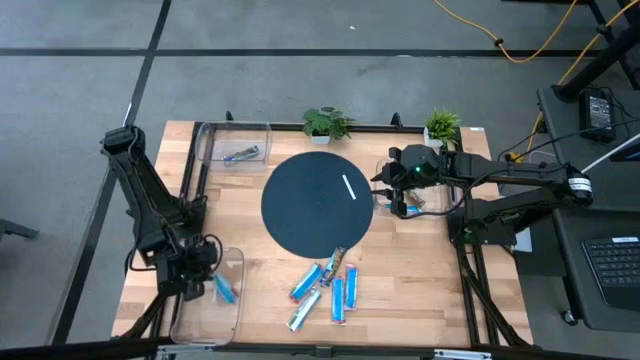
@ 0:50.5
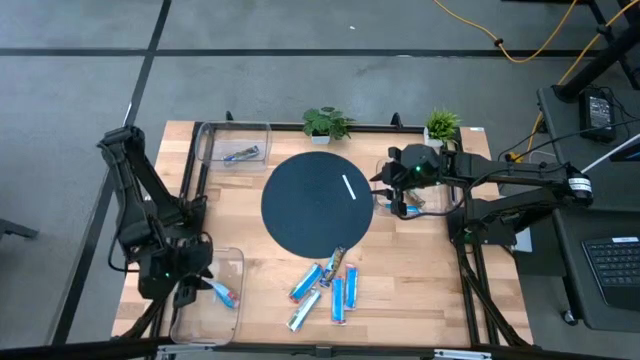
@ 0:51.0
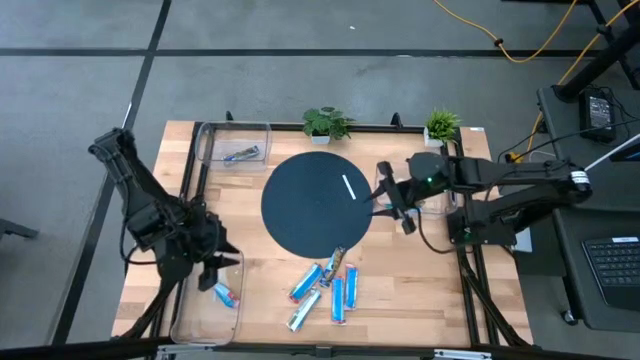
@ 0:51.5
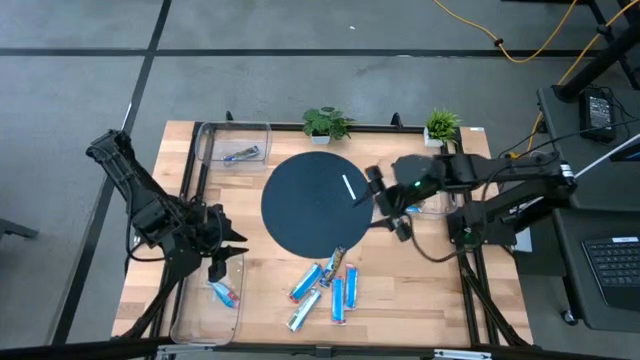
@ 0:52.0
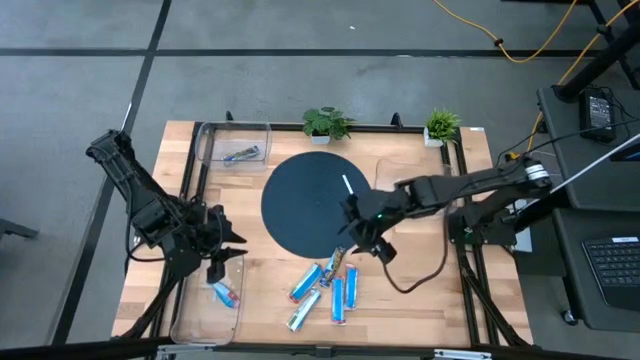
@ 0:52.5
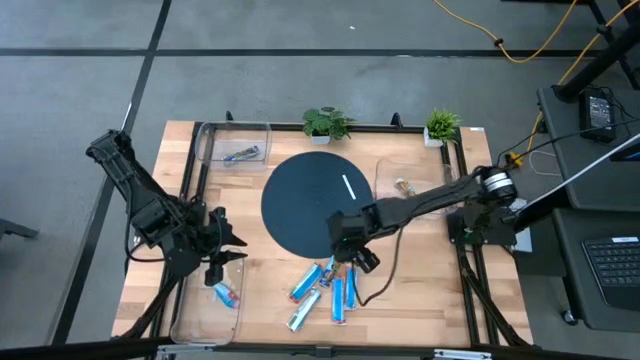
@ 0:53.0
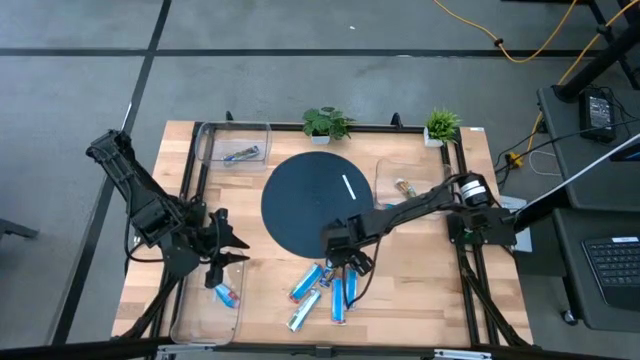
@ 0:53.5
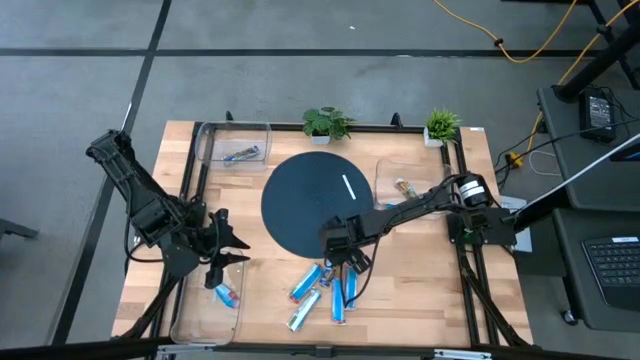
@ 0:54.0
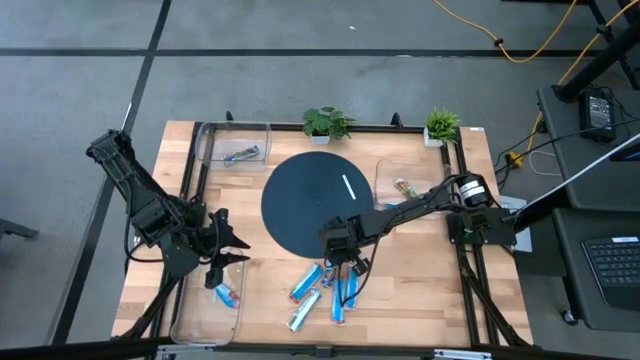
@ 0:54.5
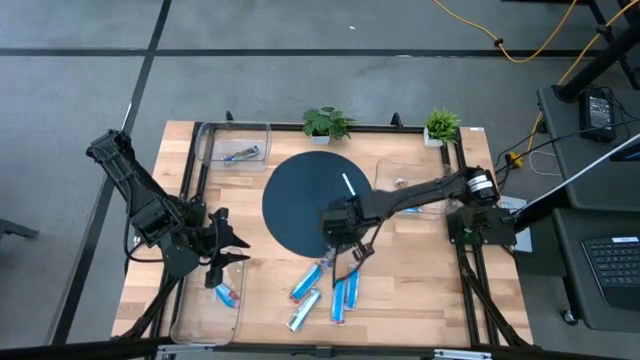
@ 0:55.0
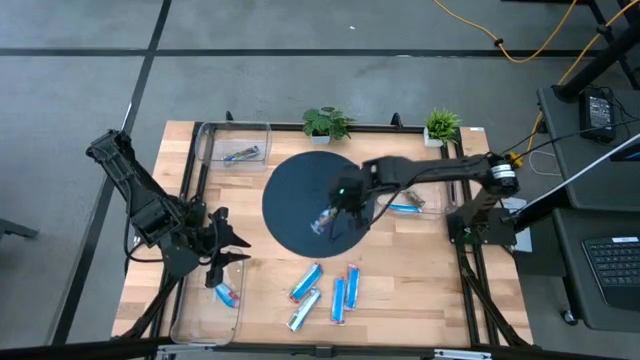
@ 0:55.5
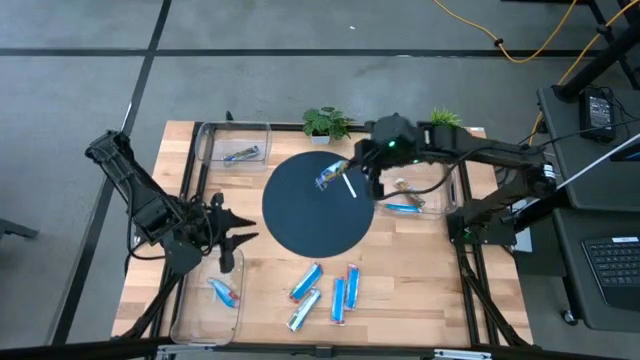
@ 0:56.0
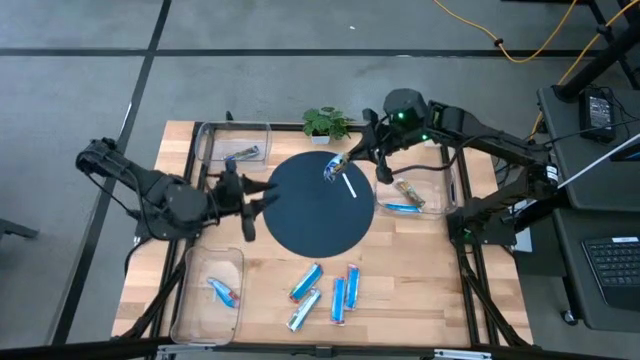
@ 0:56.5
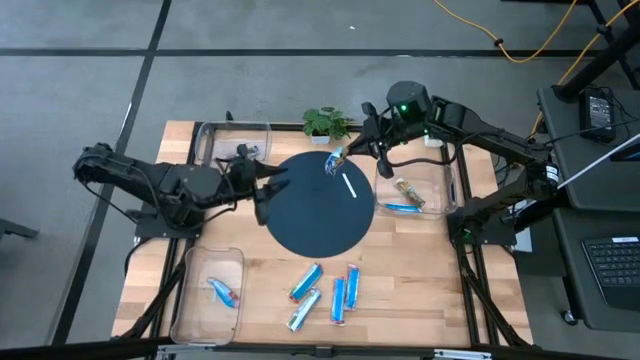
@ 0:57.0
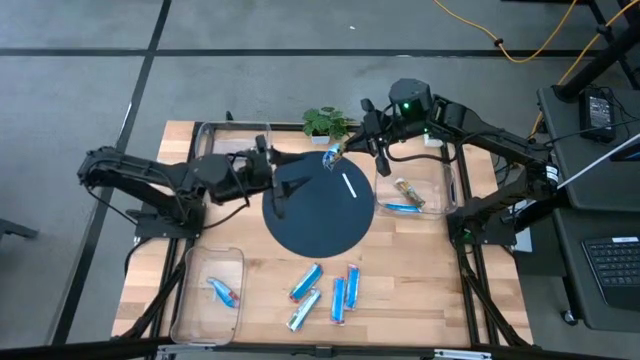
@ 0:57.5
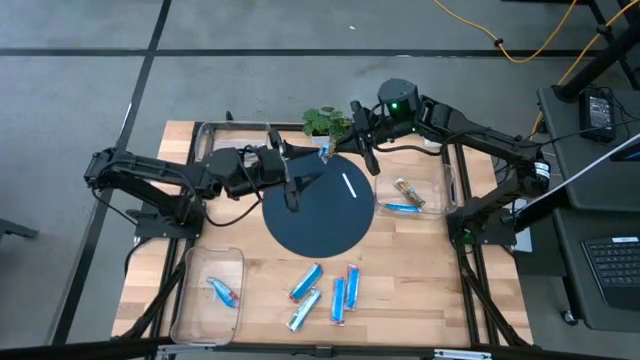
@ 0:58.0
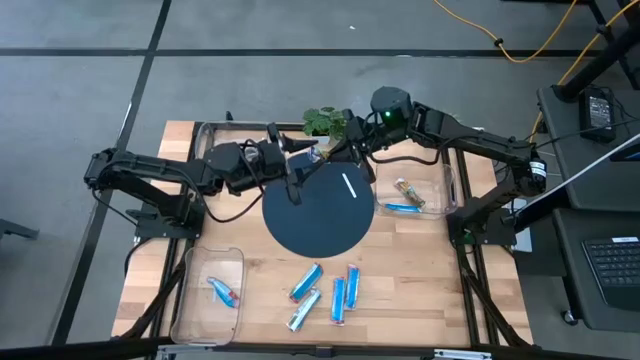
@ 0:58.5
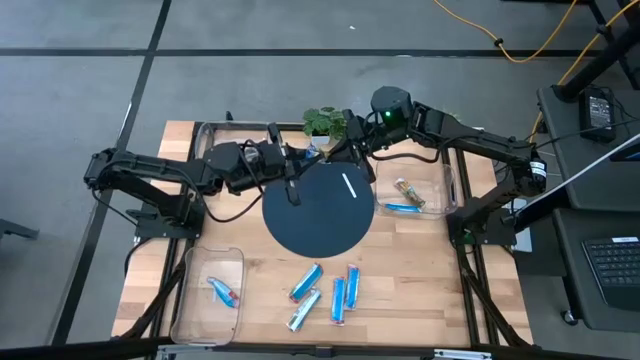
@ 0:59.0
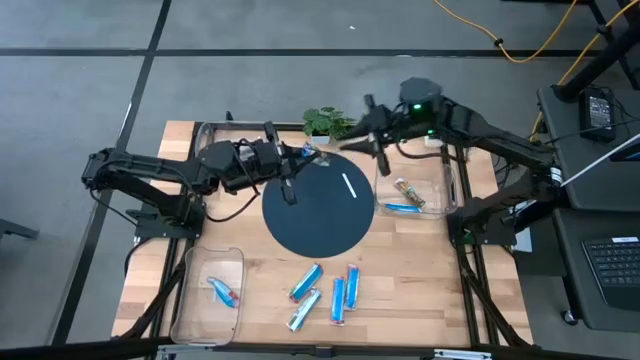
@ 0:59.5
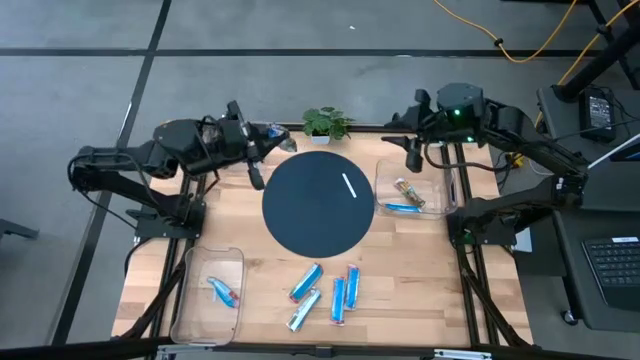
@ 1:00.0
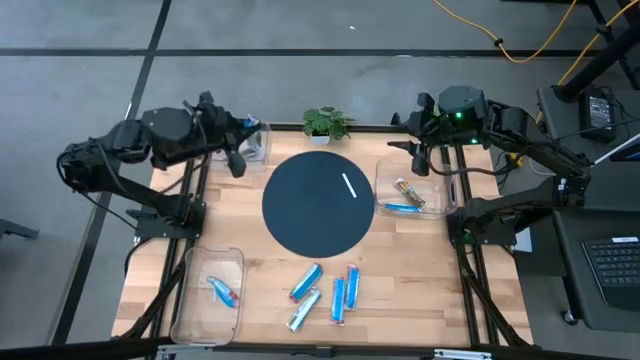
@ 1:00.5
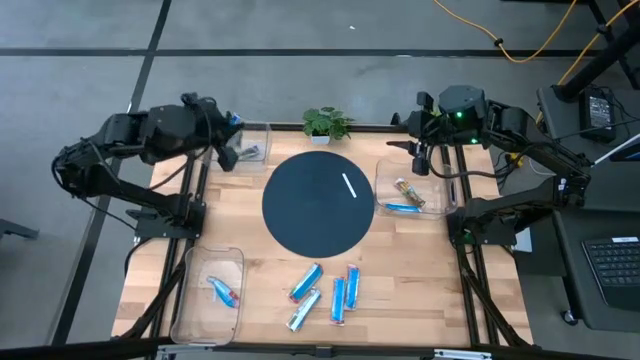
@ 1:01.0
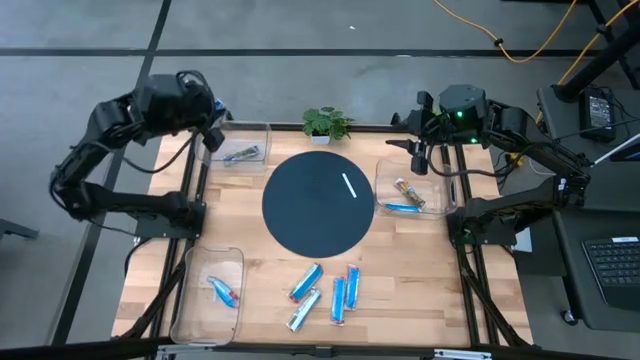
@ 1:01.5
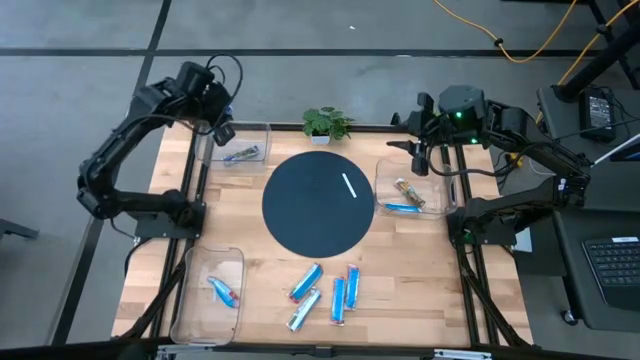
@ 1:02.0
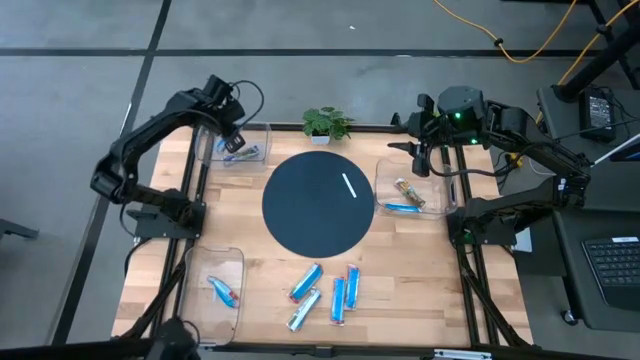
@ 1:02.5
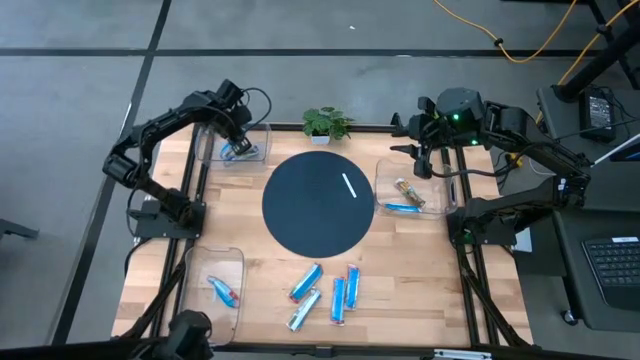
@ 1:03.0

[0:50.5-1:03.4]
Task: Pick and place Granola Bars by type
Put the blue granola bar into the top left transparent bin

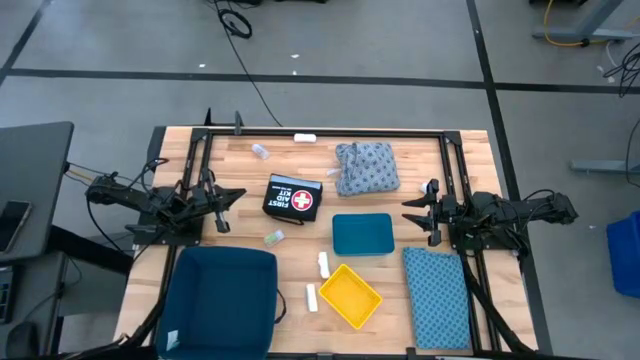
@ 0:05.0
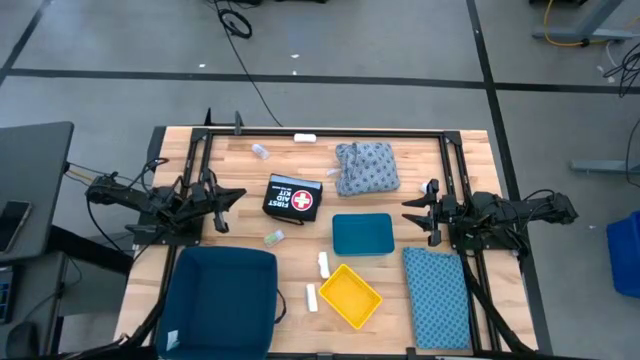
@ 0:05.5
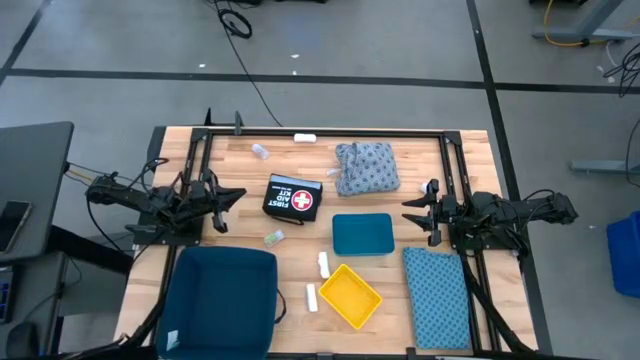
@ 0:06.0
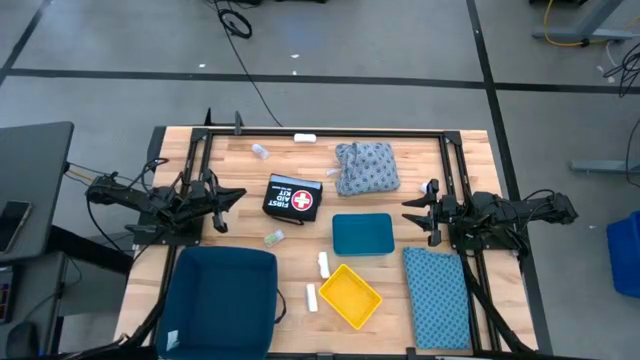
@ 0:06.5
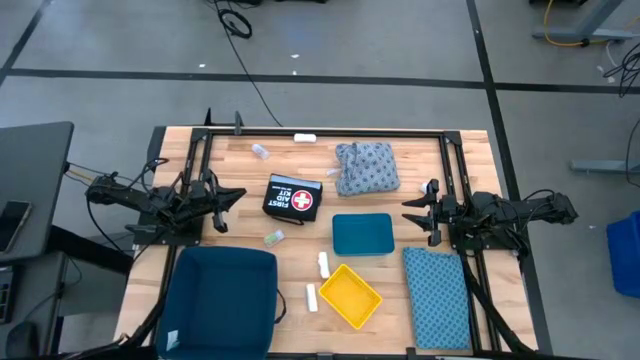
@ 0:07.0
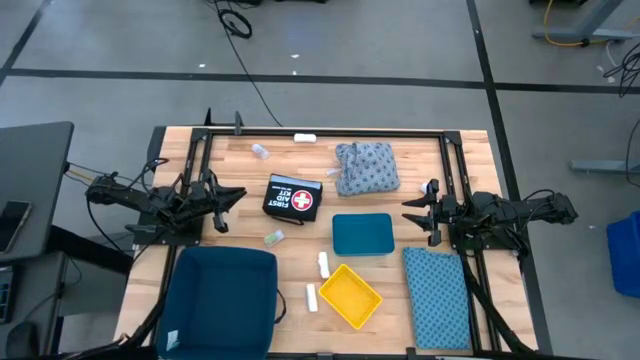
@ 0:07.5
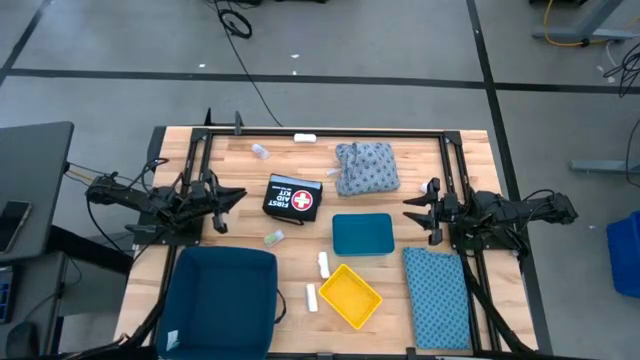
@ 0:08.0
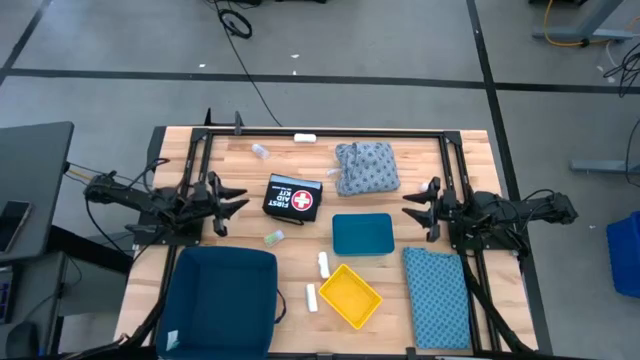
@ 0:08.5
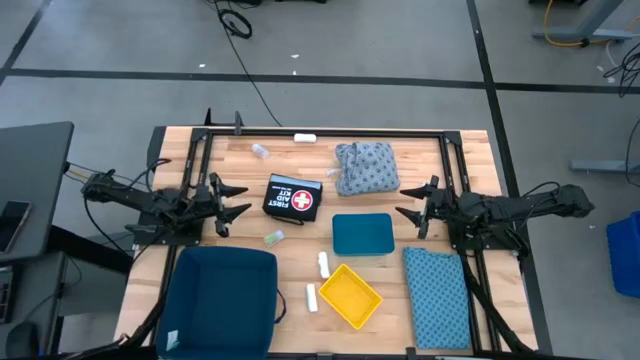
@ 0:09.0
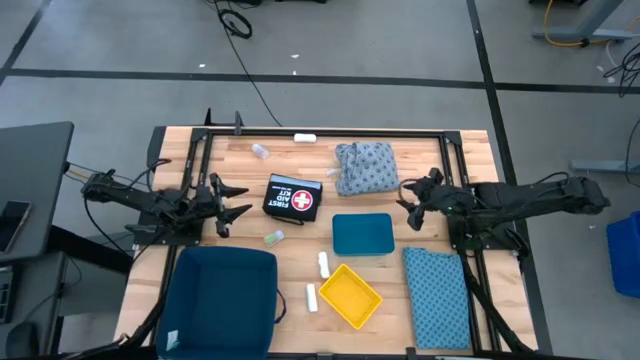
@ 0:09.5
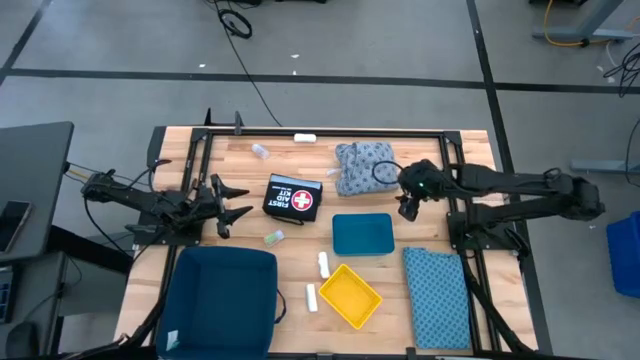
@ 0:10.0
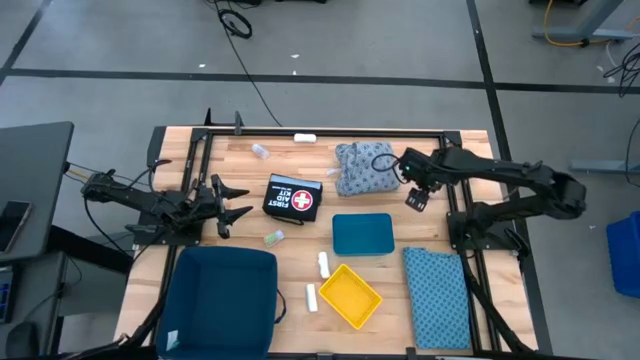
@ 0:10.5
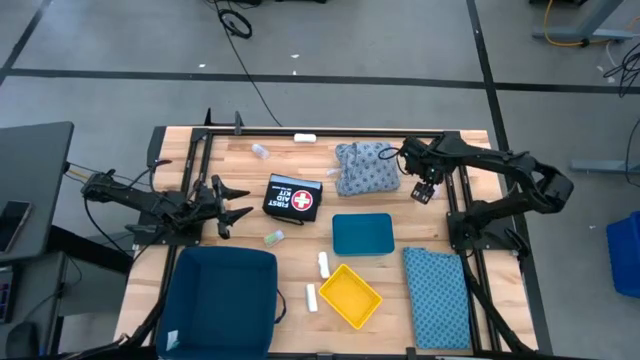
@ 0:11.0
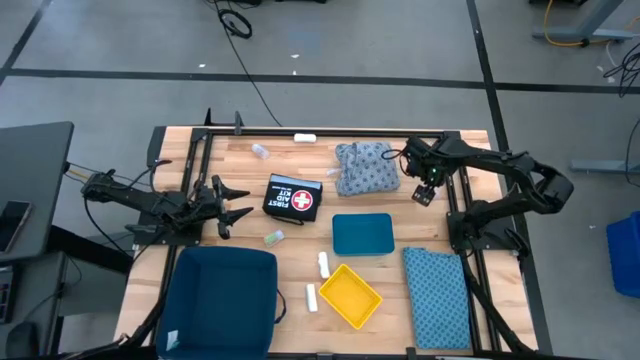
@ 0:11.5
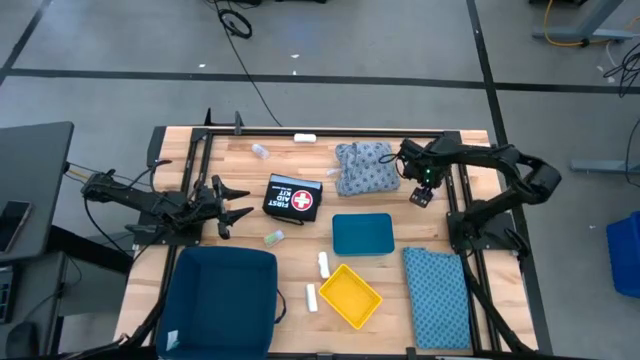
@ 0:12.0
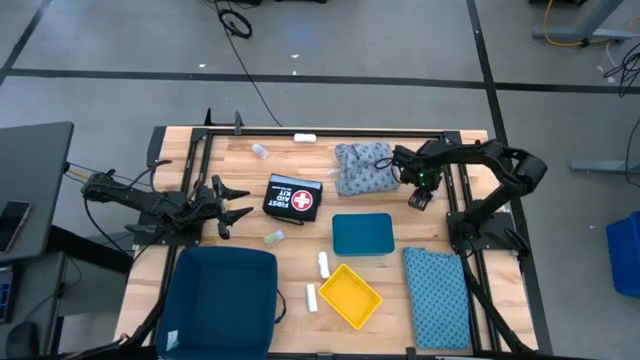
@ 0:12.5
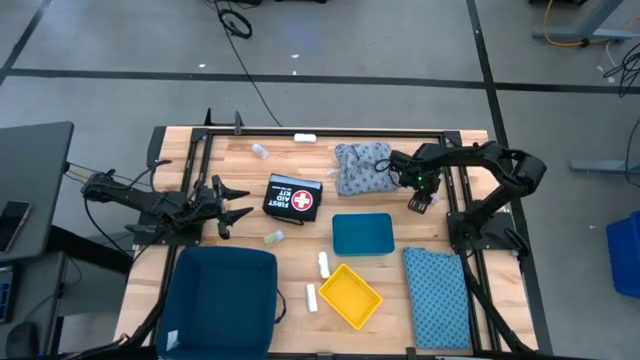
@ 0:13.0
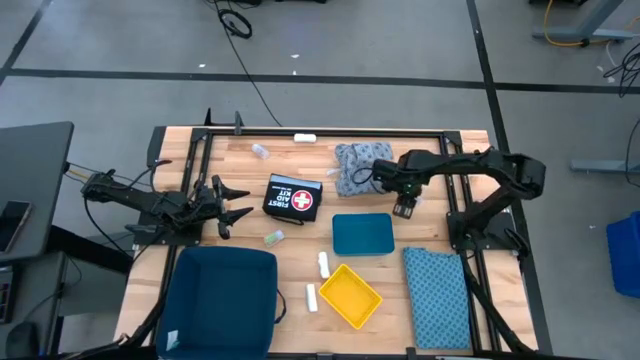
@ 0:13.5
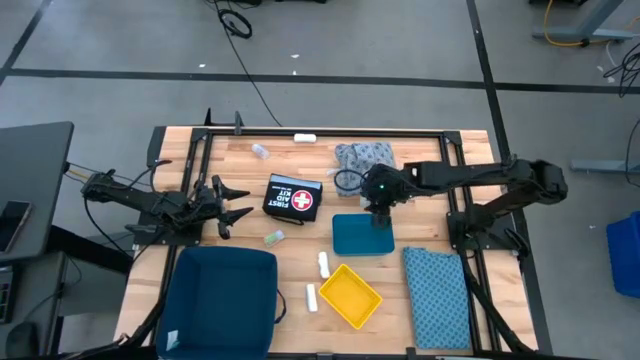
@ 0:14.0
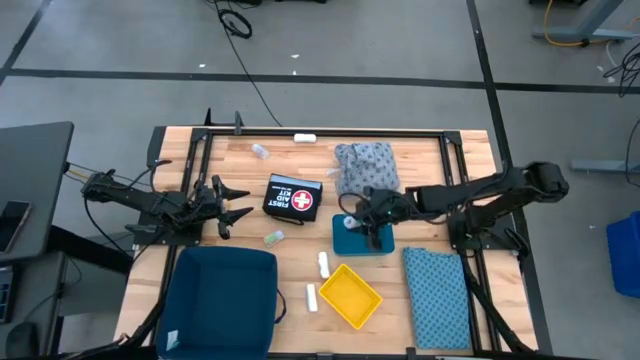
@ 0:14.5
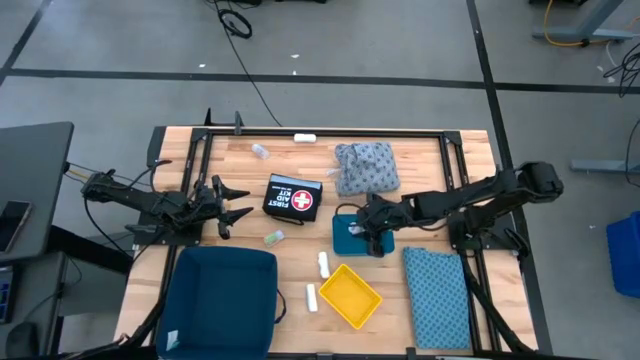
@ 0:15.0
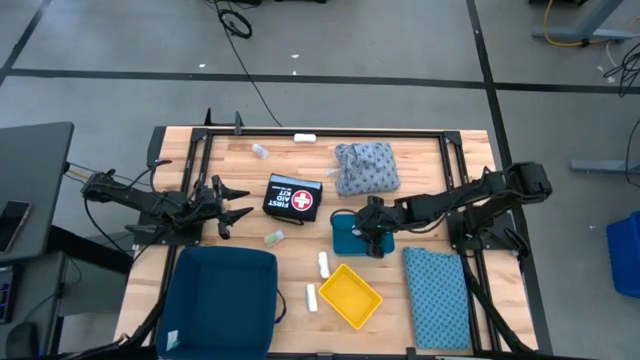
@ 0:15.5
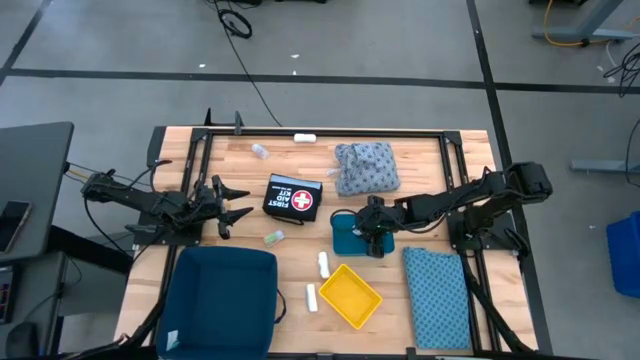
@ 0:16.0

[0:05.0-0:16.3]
Task: Pick & place medical supplies in basket/bin
Put the middle pill bottle into the blue bin
